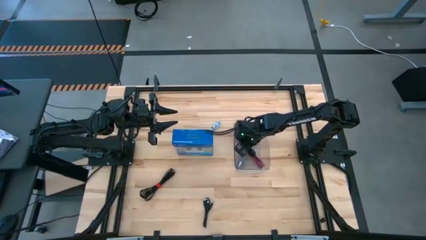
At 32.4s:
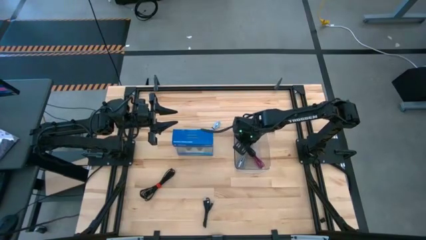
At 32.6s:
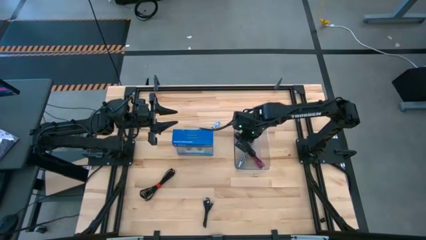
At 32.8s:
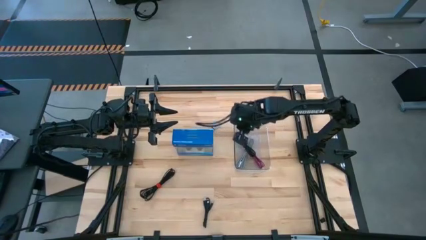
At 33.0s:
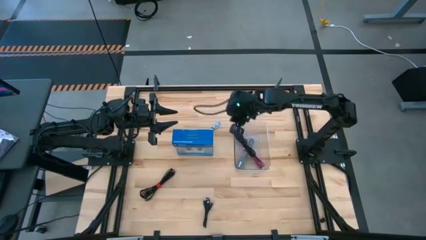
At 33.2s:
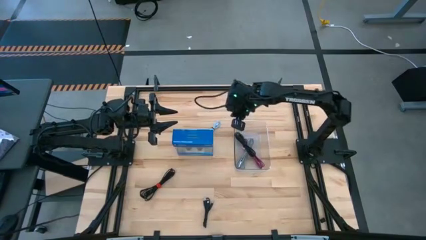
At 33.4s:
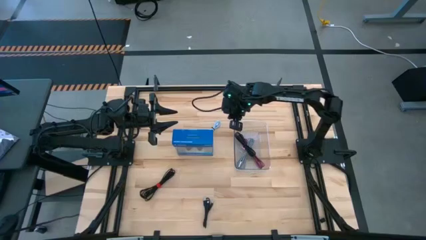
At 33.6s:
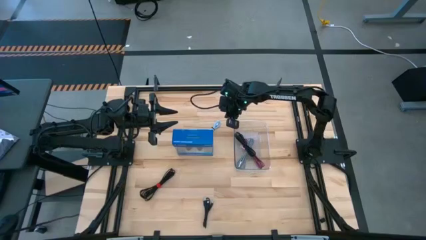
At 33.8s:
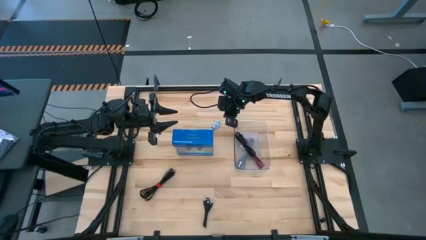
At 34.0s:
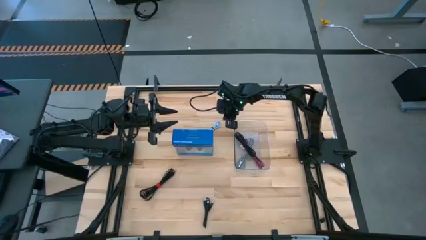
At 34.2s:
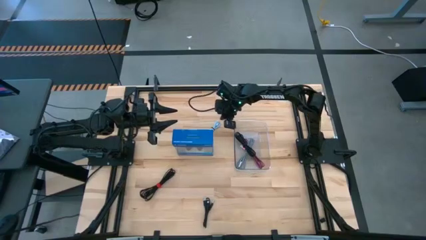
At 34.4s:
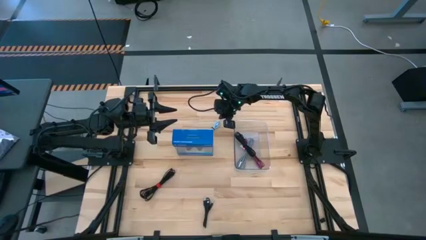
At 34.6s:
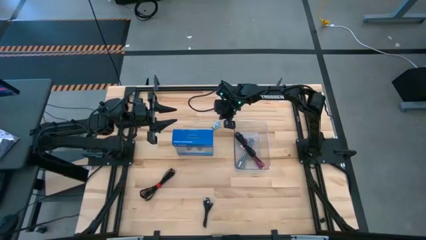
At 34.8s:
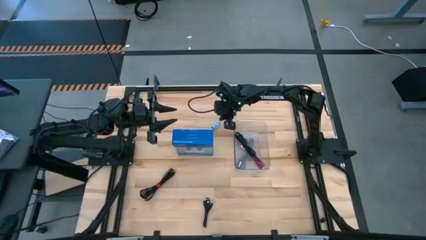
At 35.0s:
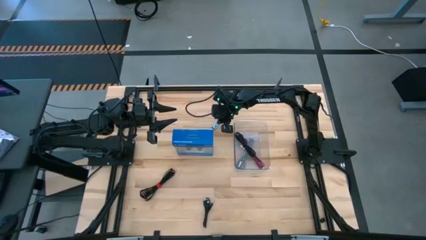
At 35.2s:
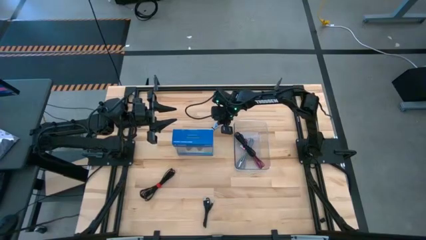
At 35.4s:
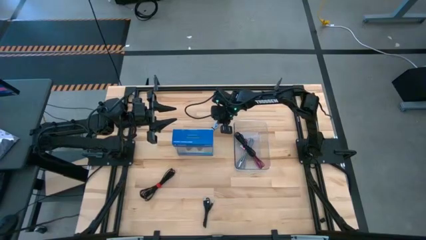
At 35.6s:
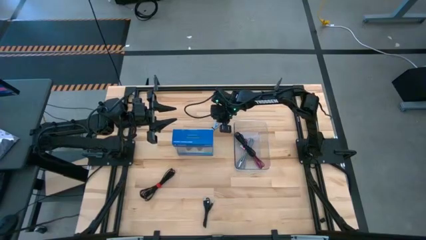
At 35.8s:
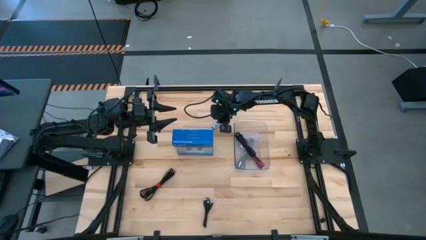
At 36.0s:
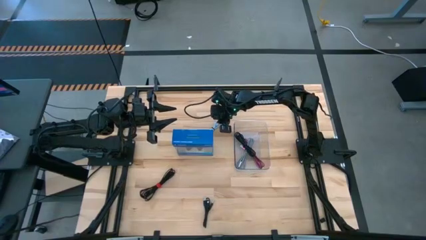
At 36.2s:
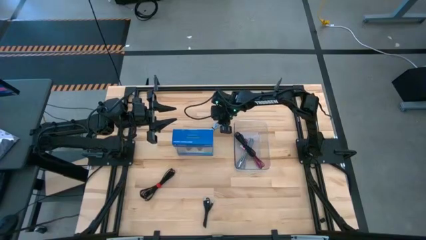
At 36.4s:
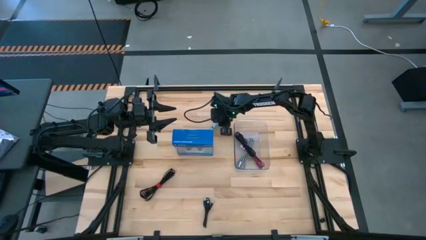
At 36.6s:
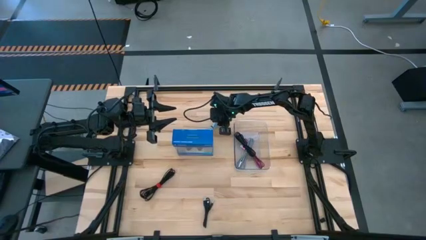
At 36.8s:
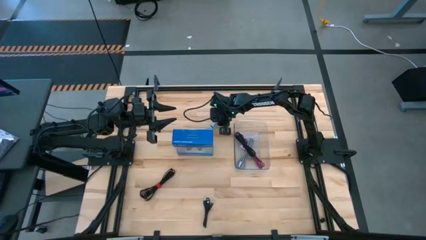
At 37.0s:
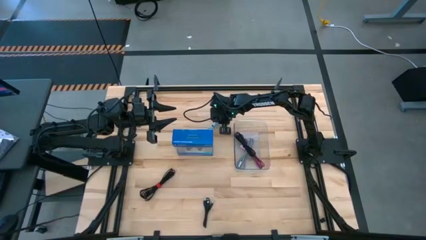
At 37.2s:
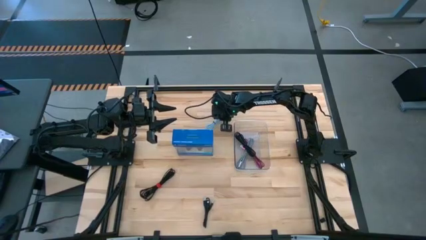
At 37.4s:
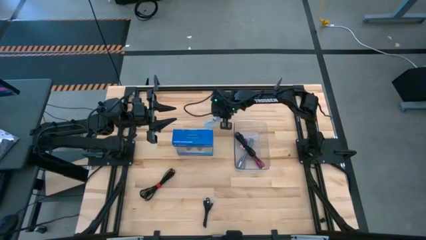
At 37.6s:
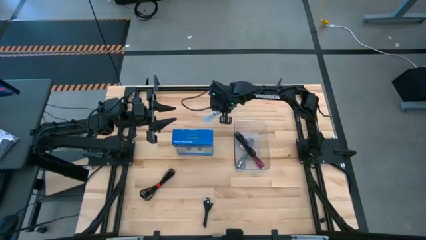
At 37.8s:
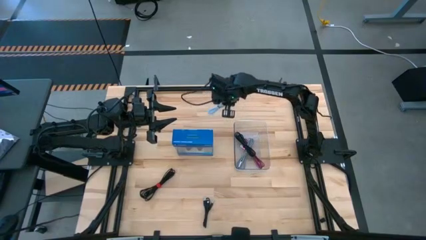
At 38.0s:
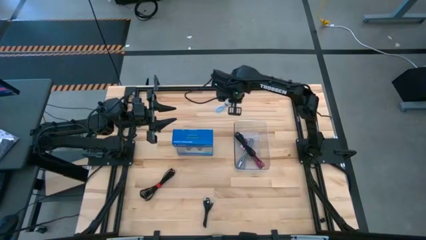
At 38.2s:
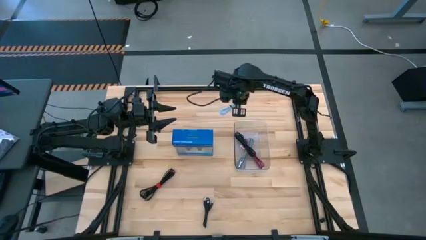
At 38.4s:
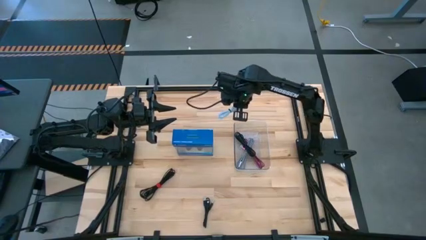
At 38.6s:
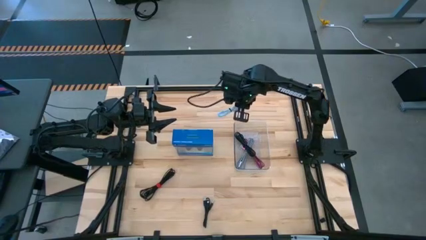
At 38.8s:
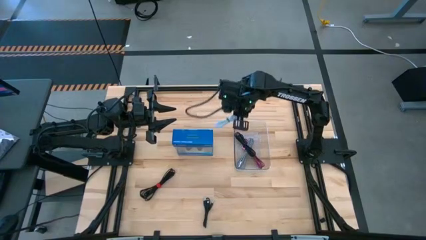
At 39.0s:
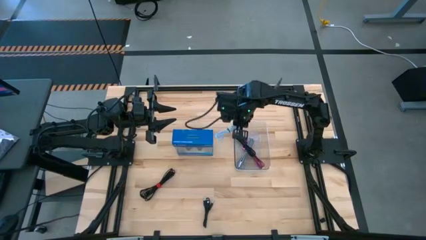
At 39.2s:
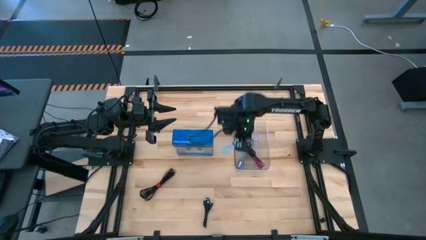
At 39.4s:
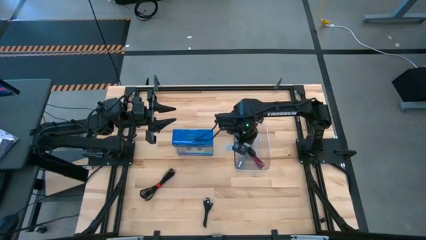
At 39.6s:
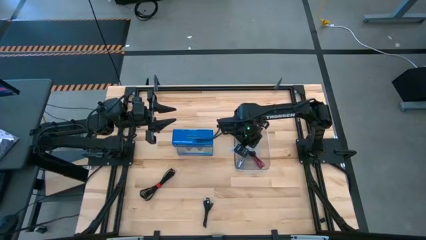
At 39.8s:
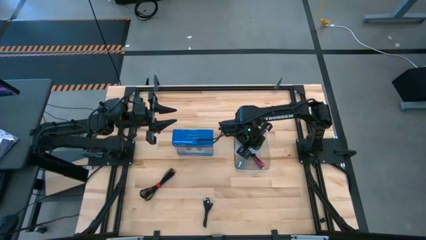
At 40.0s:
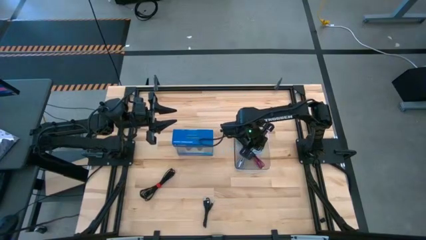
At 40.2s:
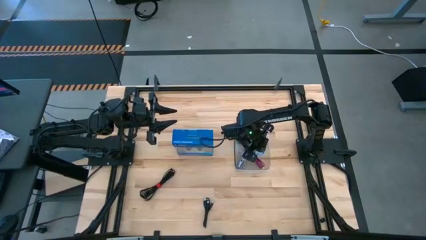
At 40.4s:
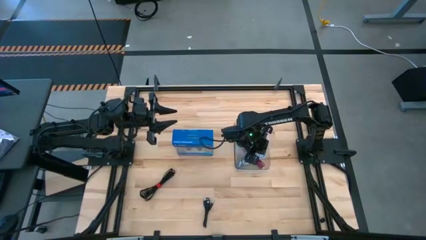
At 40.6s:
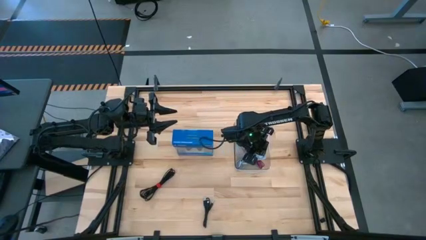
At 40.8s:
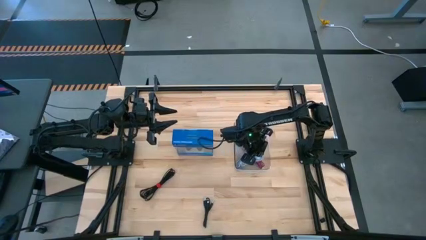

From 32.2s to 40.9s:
Task: Pick and place USB-C Cables
Put the light blue charger cable into the transparent bin

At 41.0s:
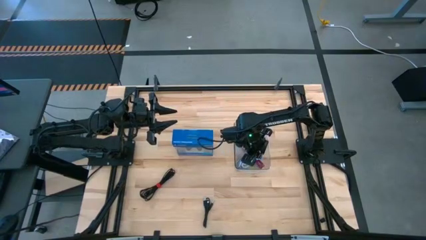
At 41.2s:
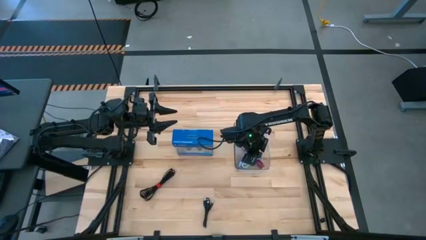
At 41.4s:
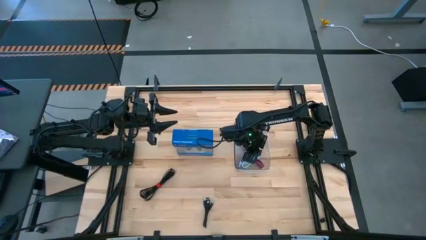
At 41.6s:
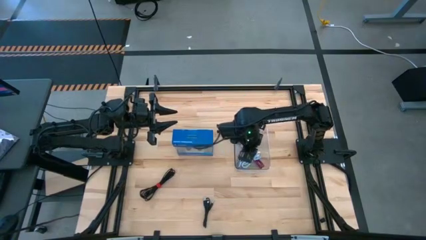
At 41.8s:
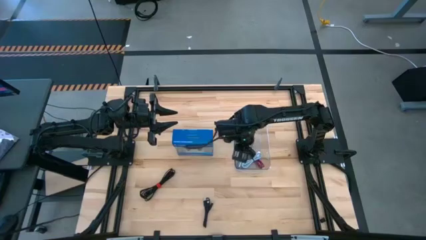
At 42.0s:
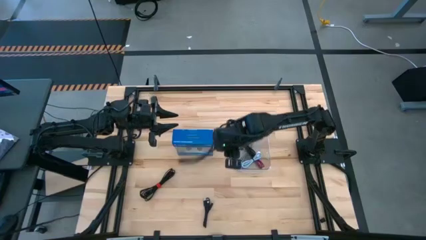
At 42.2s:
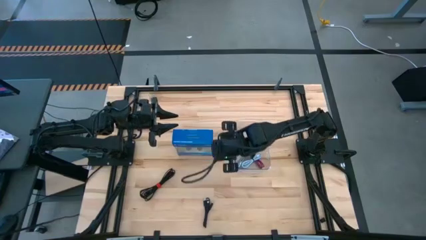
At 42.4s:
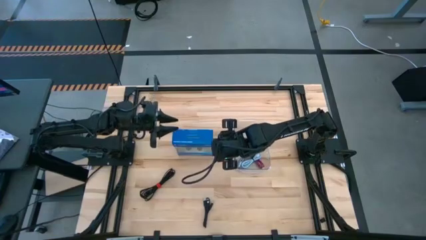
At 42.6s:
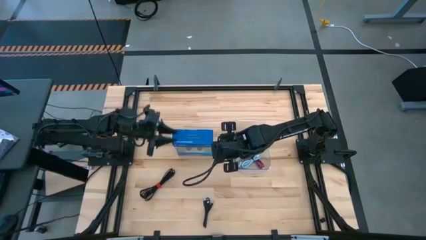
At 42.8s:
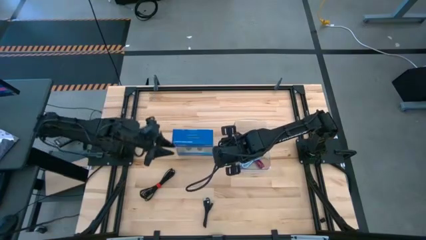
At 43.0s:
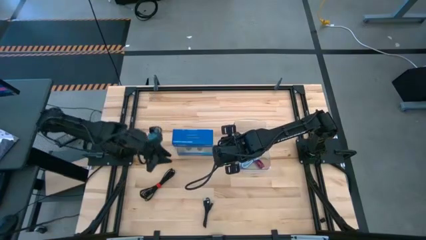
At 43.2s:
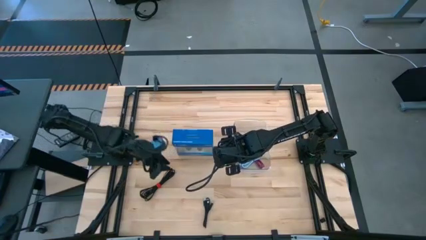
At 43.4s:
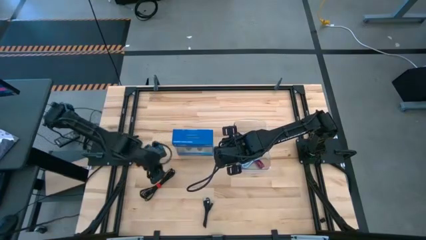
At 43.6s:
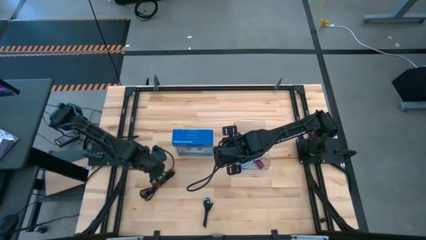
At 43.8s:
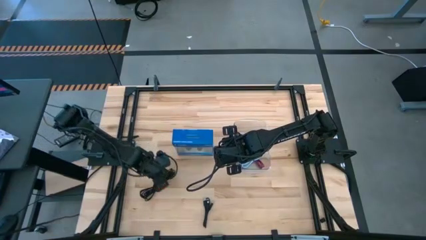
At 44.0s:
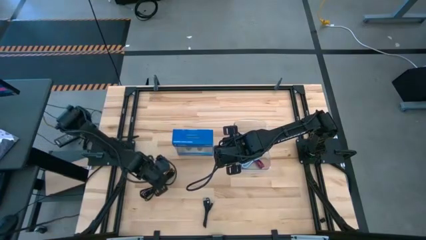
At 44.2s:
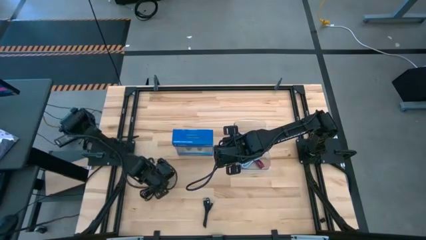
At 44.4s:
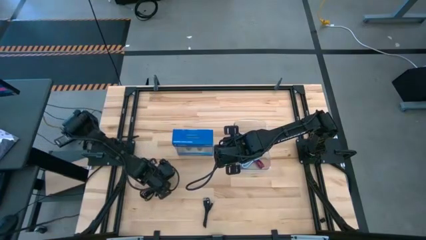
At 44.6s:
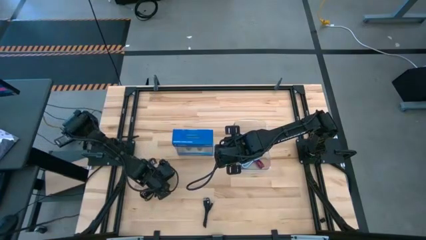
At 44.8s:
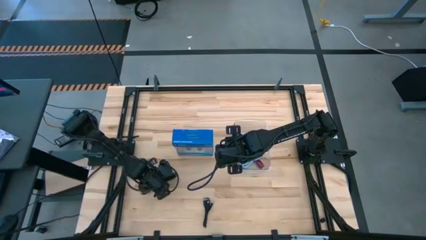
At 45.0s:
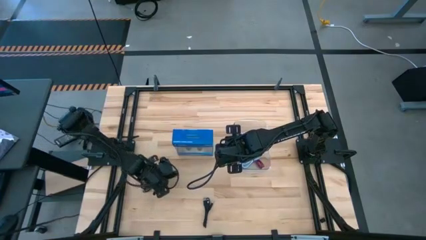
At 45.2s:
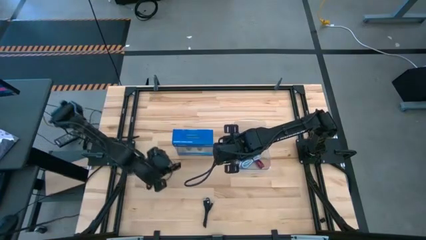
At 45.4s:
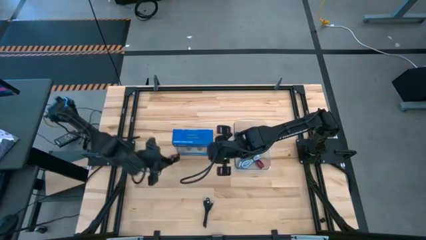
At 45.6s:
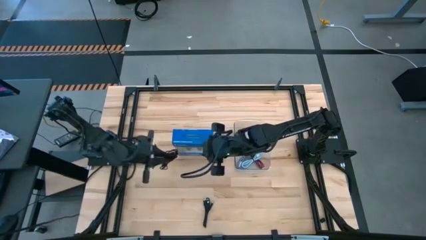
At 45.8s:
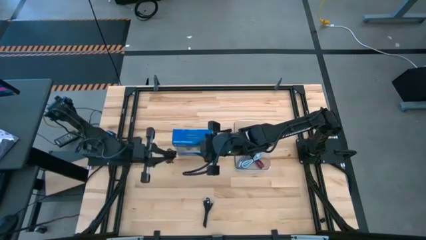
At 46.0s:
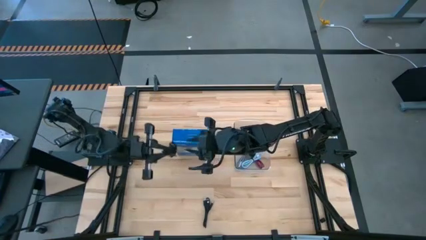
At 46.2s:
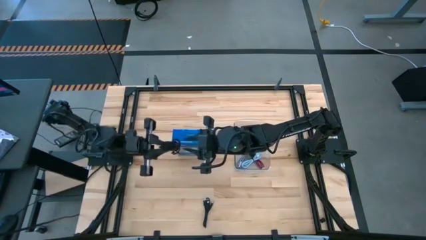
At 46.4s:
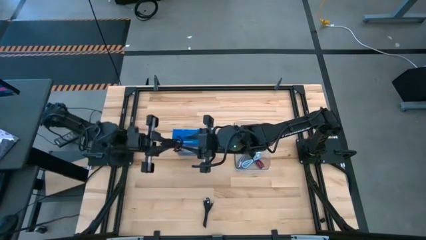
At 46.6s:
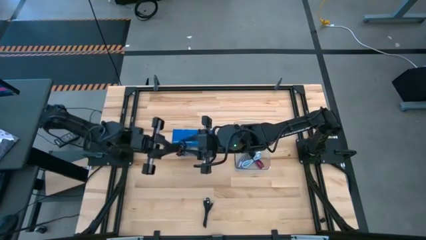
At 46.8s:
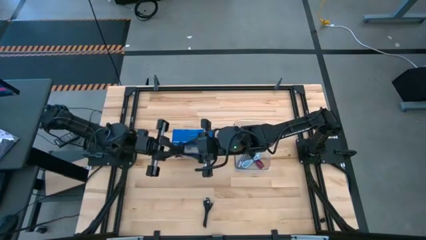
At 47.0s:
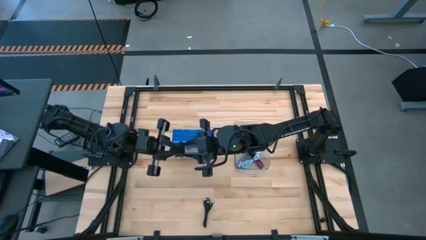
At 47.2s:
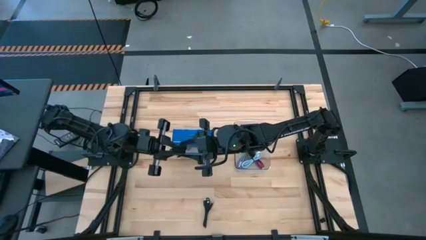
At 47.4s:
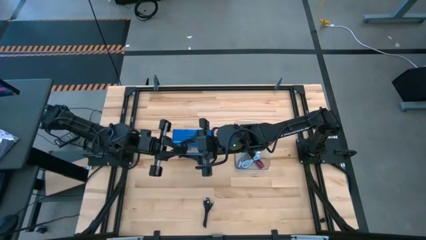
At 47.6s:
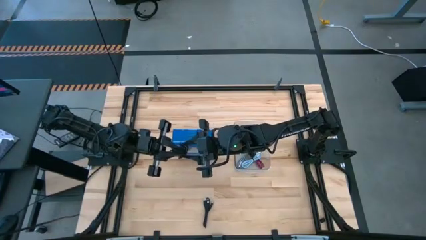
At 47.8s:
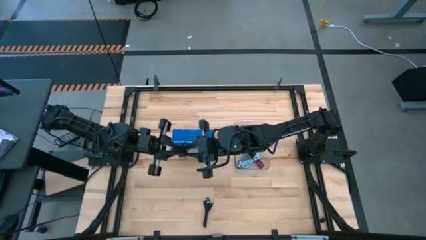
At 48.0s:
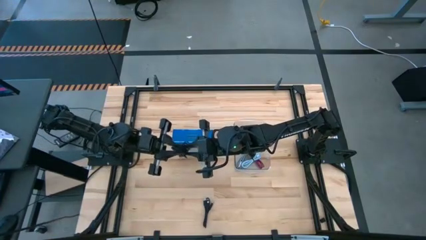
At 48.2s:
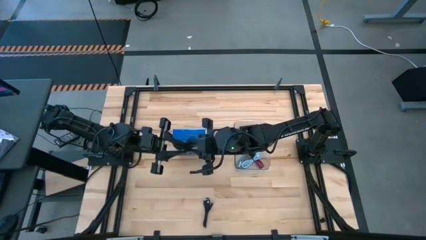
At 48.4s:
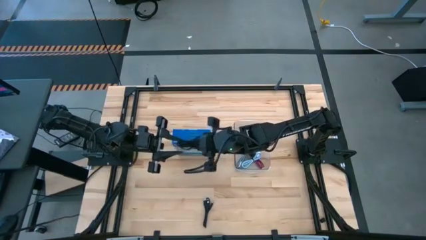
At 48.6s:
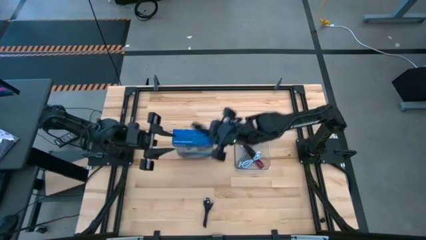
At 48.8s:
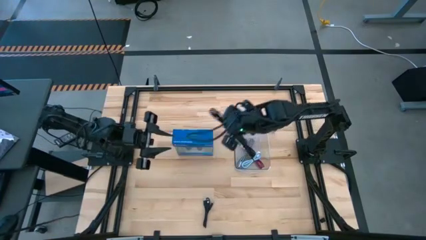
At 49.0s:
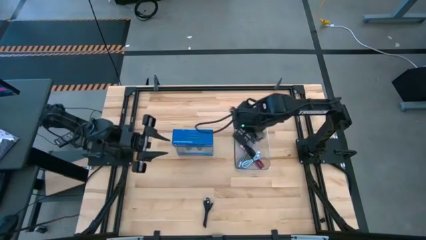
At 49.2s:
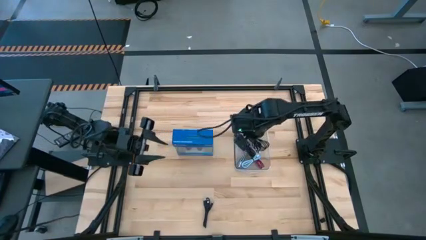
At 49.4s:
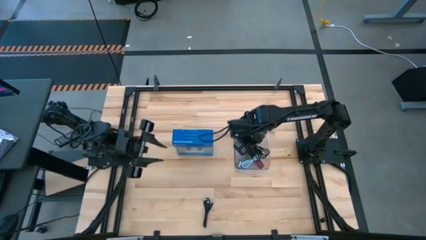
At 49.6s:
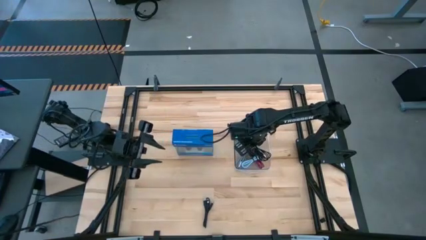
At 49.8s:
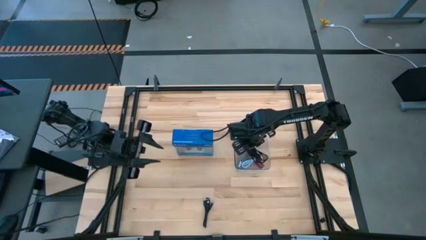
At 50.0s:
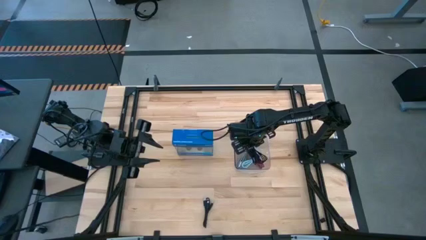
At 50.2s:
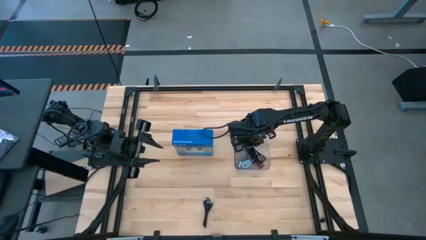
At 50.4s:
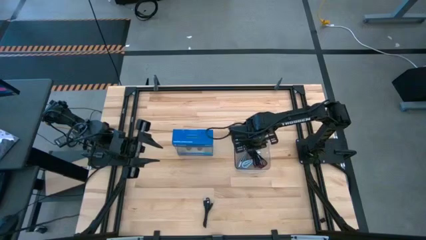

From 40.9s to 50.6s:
Put the left black charger cable into the transparent bin
